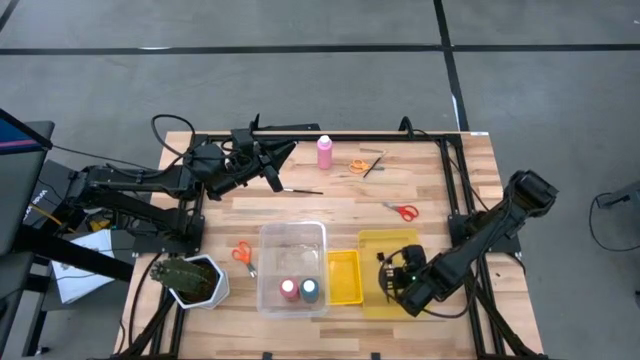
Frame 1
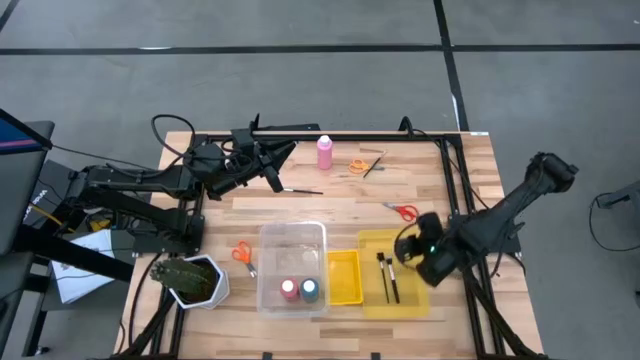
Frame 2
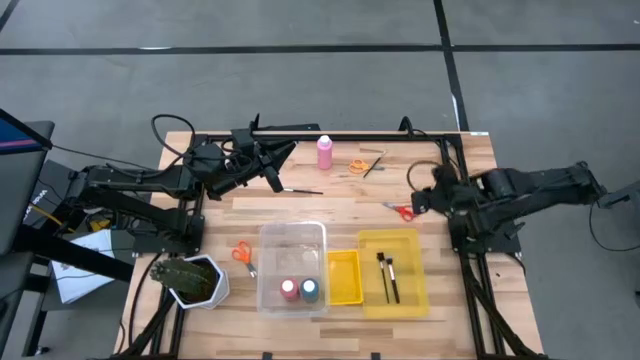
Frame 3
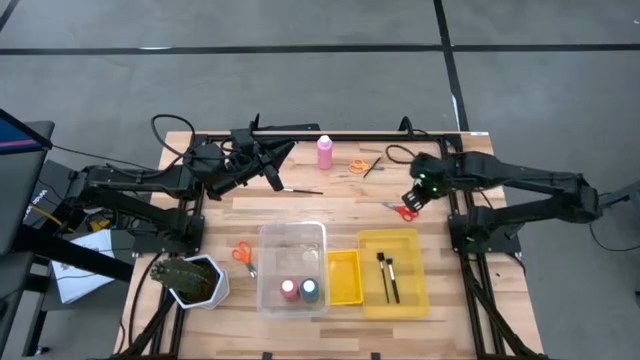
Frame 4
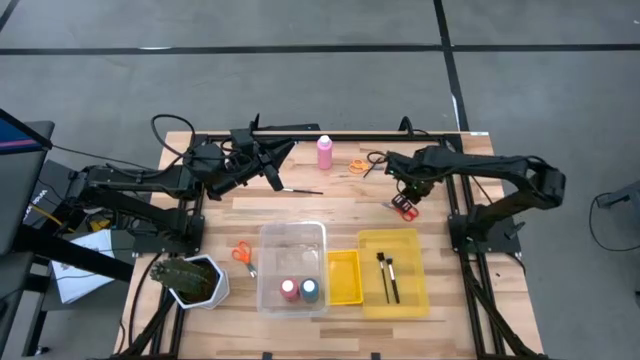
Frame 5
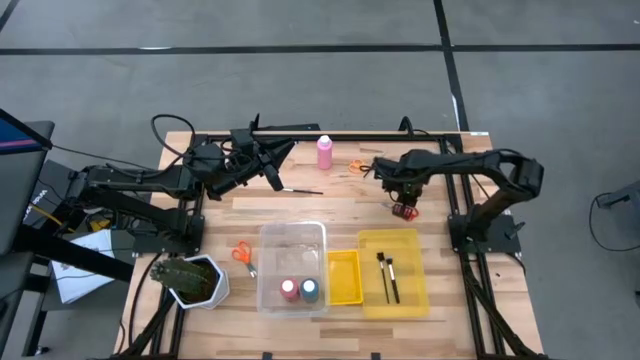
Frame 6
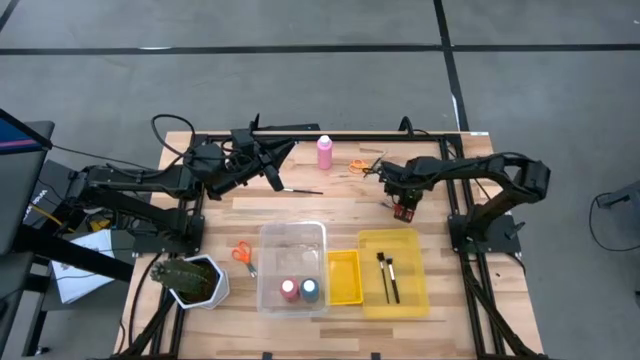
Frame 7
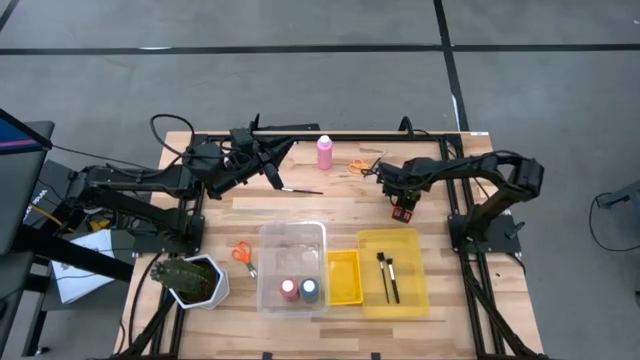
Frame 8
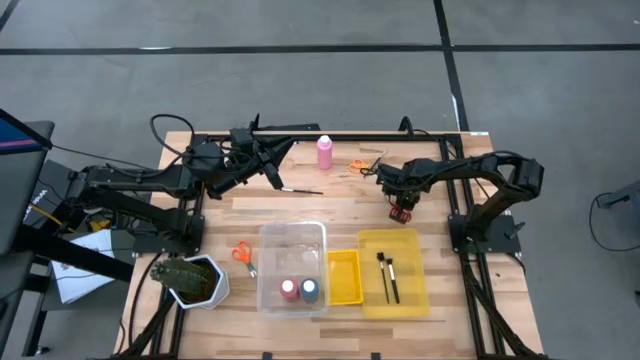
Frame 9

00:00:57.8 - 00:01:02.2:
Task: Pick & Place Paint Supplies
Put the red scissors into the left yellow bin

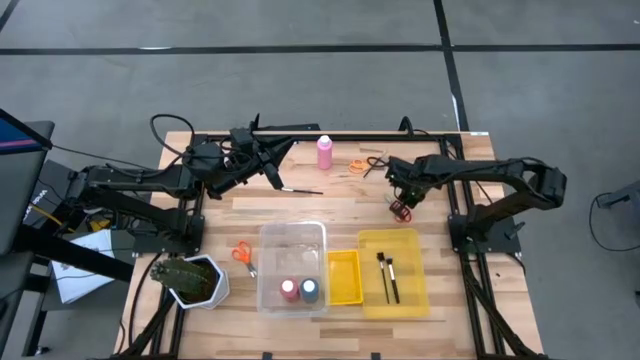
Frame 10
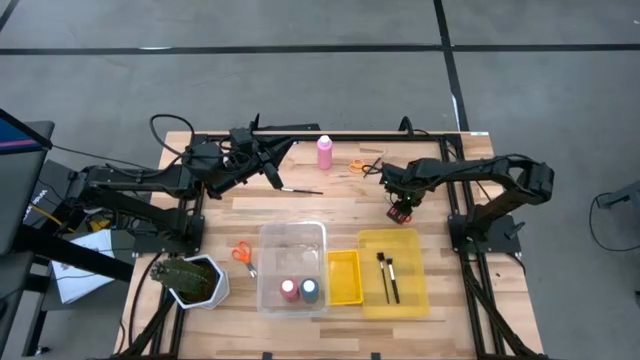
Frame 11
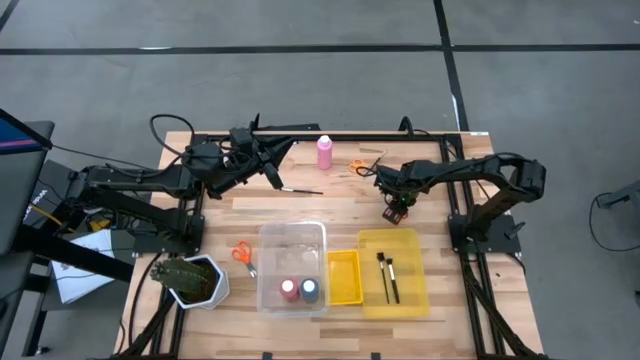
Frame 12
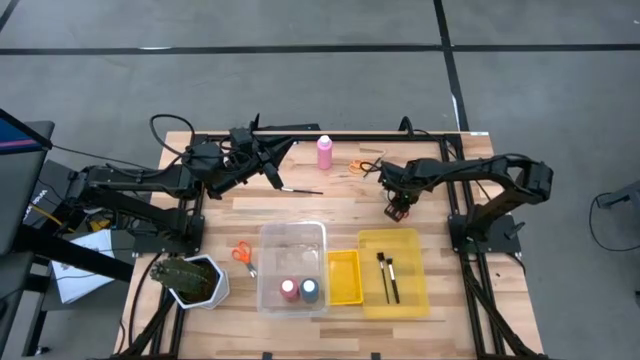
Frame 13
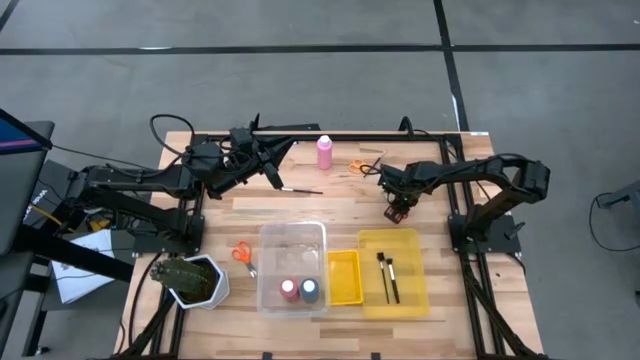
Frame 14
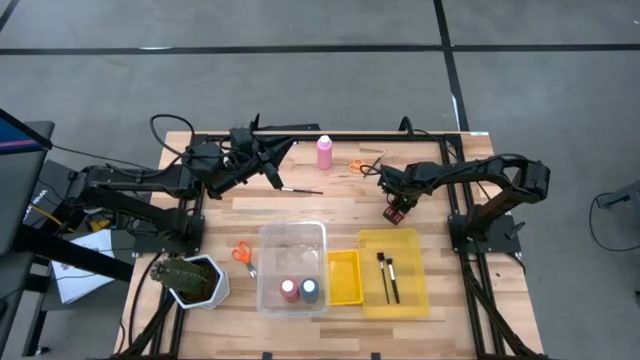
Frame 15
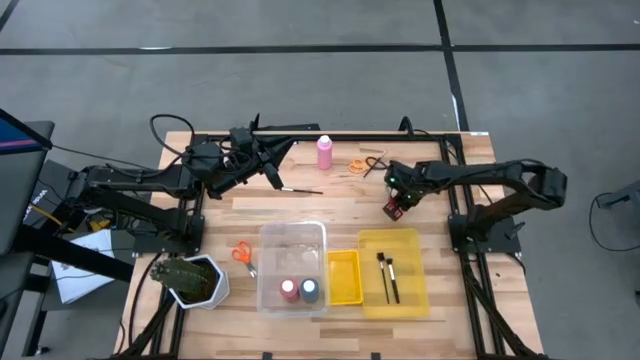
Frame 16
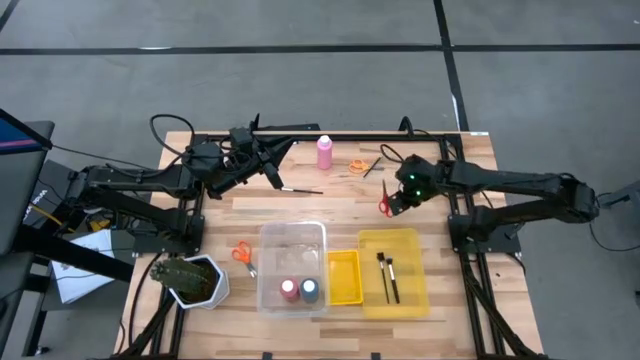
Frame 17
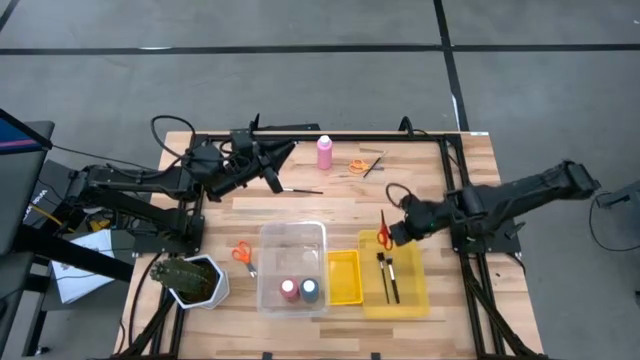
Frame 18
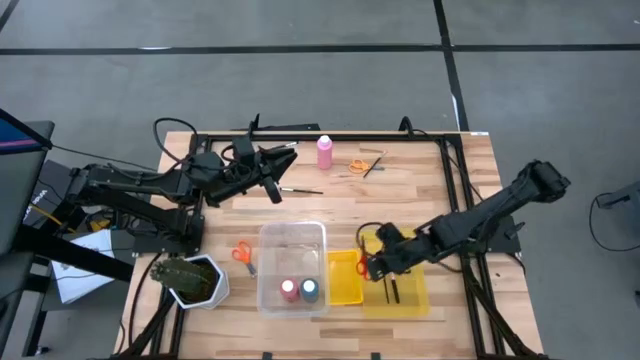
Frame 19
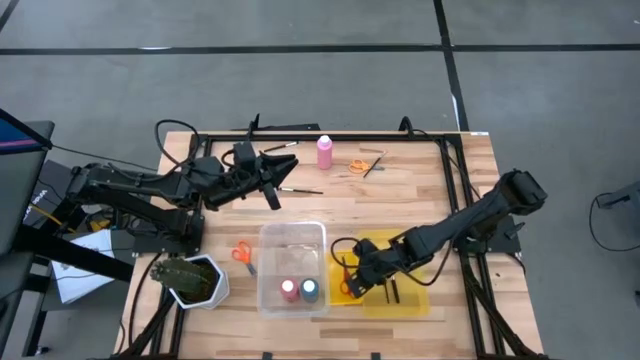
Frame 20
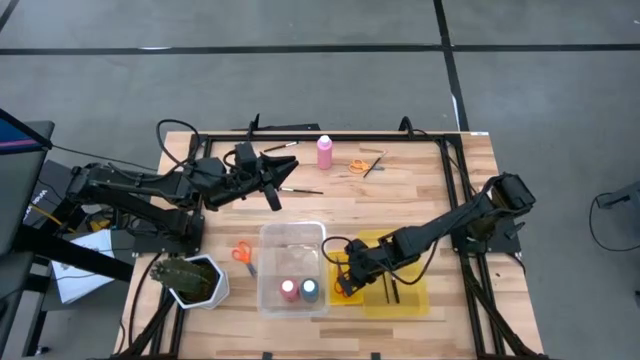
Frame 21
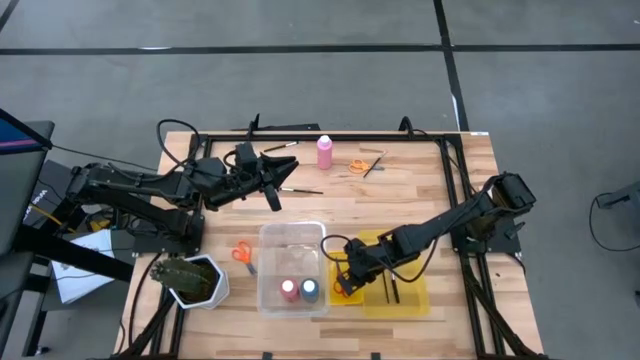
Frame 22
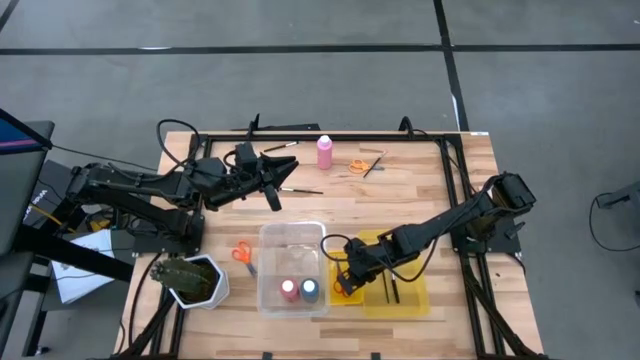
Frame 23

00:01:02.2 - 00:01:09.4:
Put the red scissors into the left yellow bin
